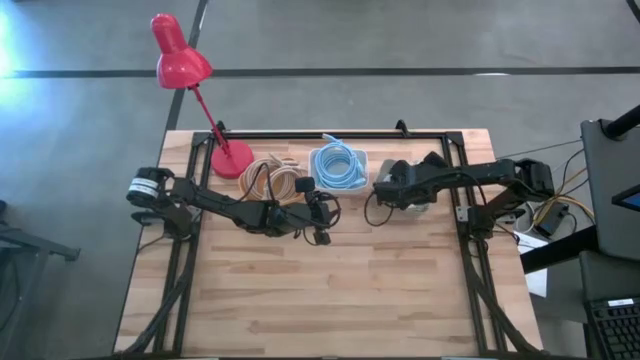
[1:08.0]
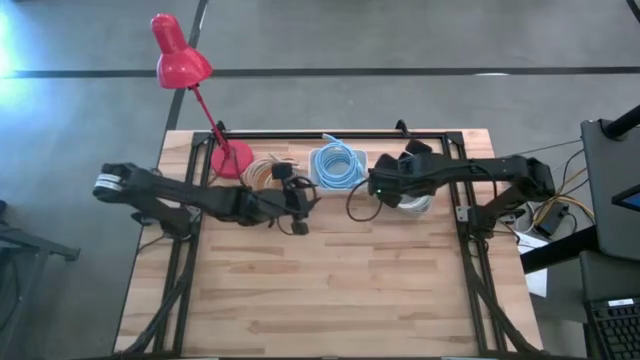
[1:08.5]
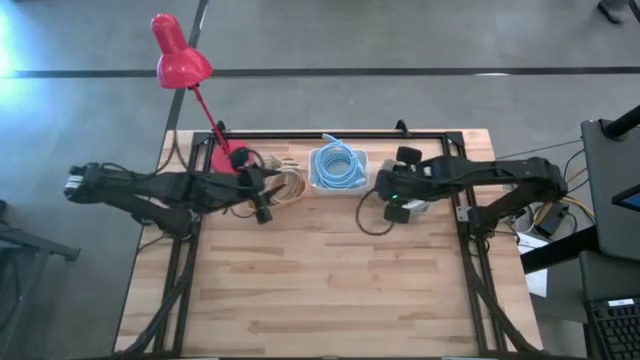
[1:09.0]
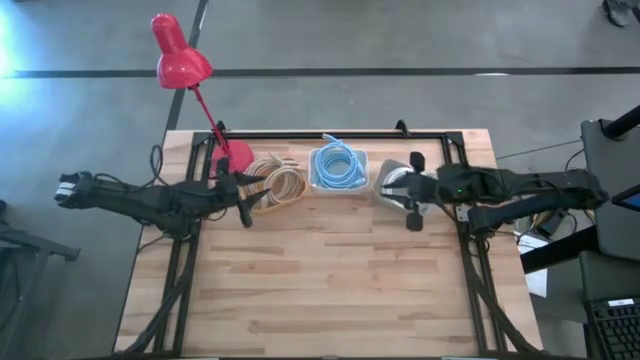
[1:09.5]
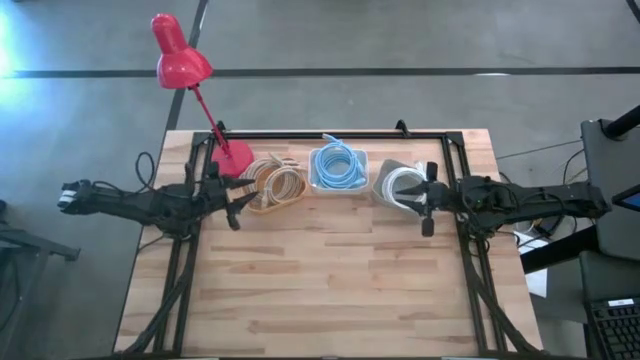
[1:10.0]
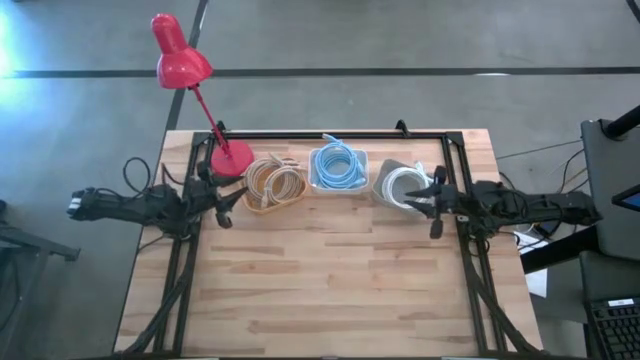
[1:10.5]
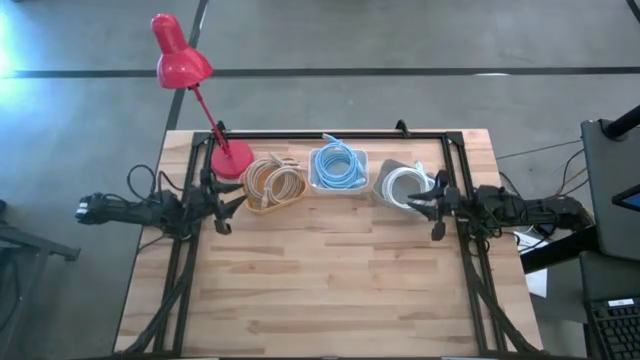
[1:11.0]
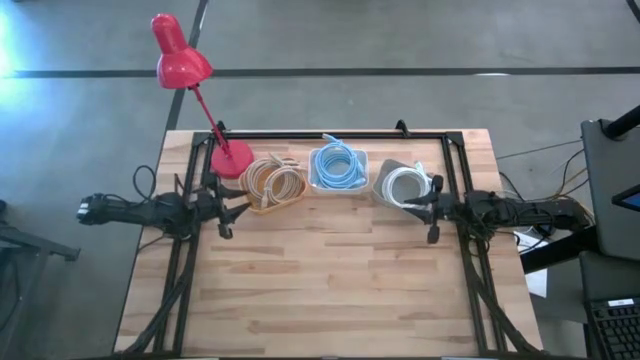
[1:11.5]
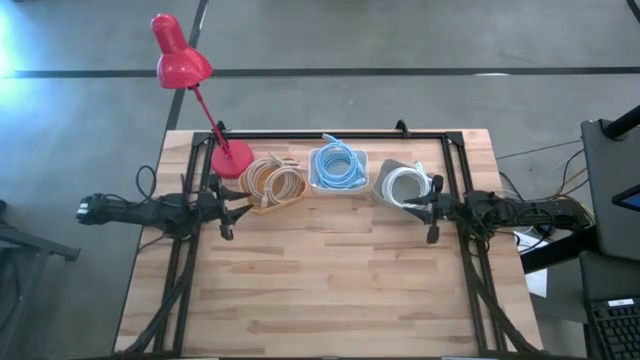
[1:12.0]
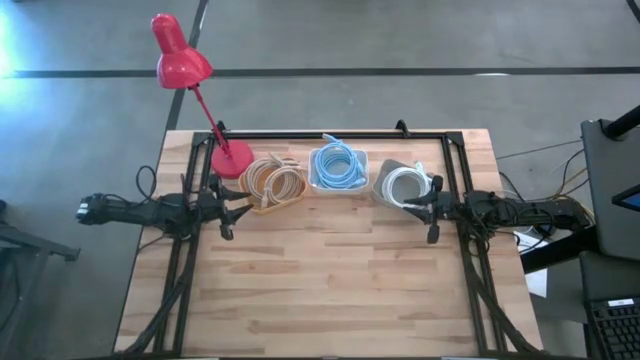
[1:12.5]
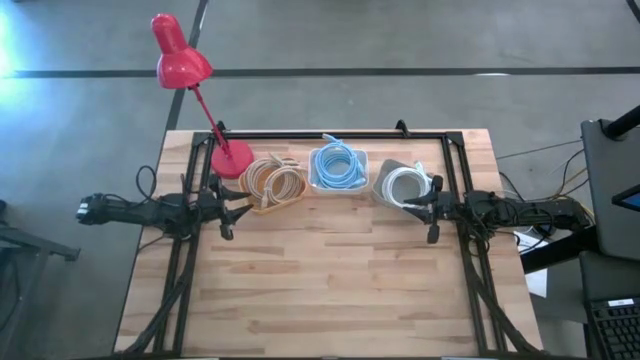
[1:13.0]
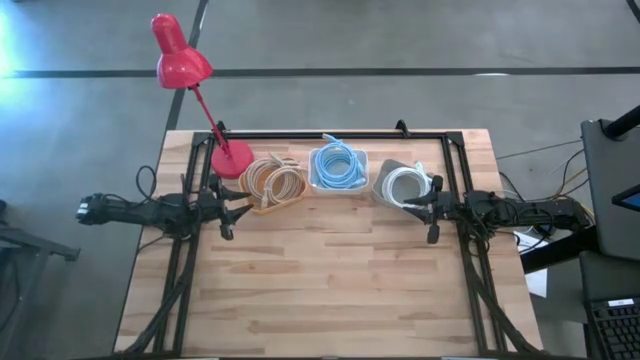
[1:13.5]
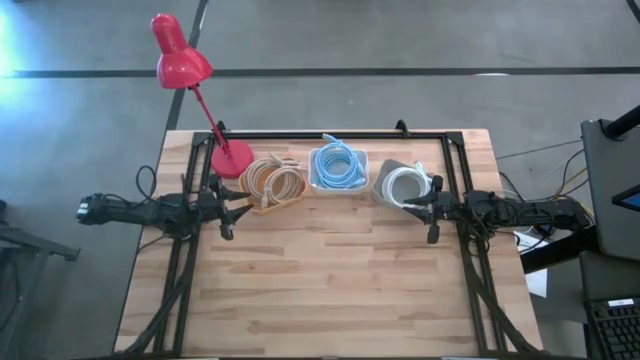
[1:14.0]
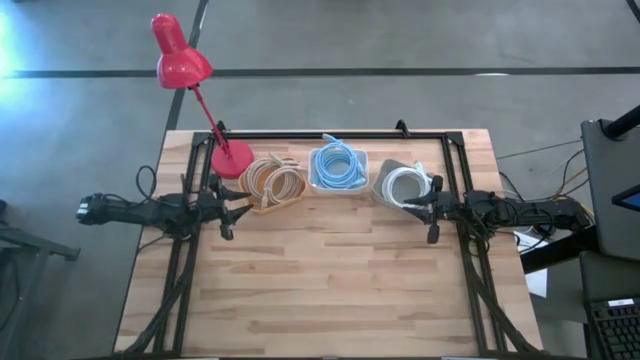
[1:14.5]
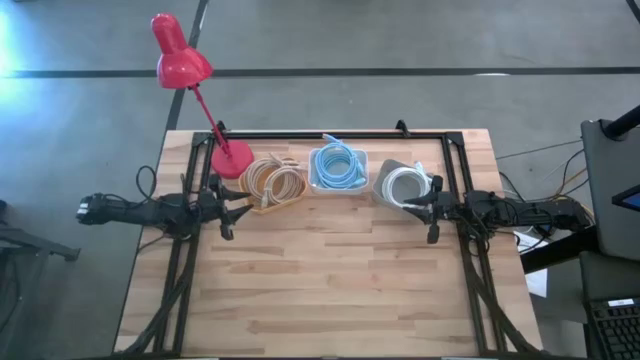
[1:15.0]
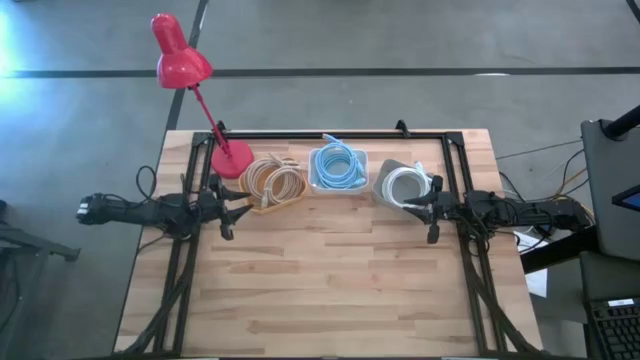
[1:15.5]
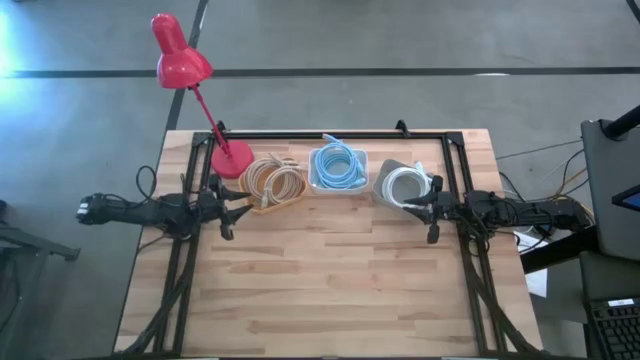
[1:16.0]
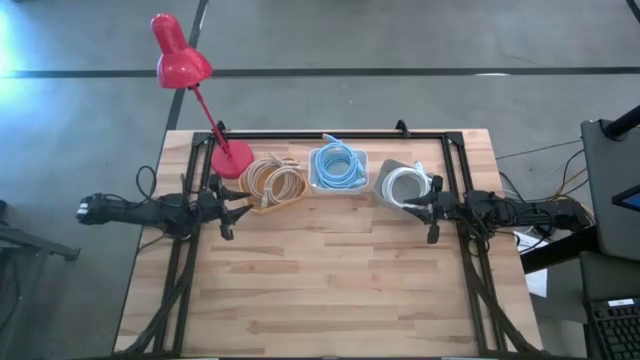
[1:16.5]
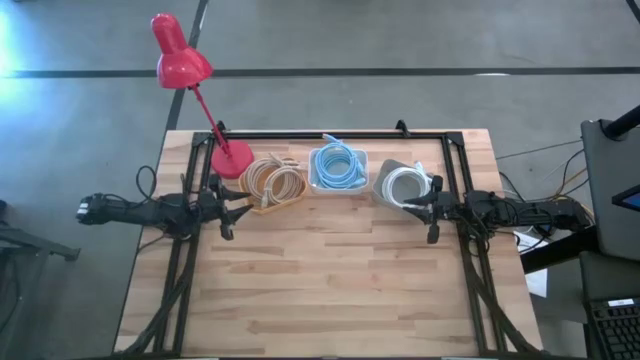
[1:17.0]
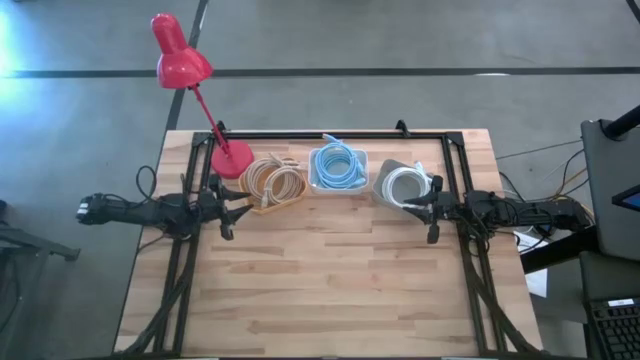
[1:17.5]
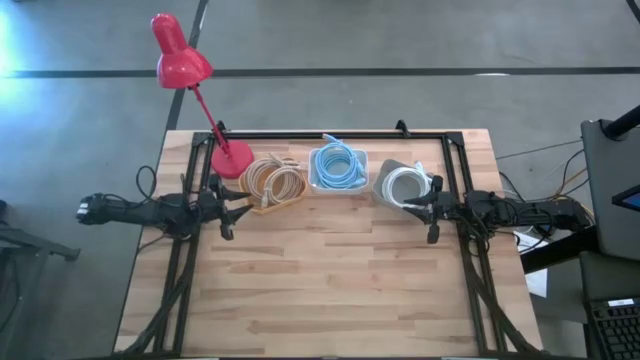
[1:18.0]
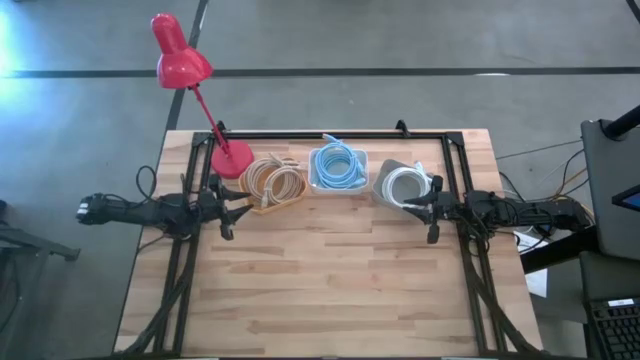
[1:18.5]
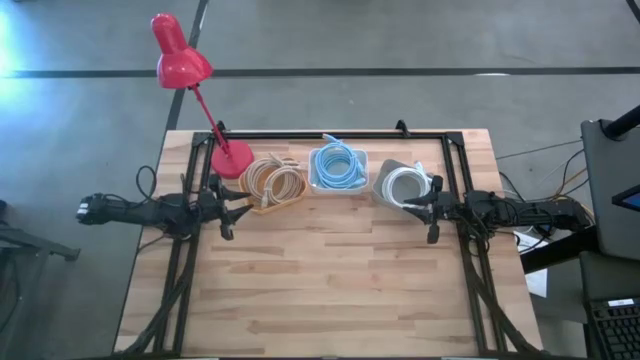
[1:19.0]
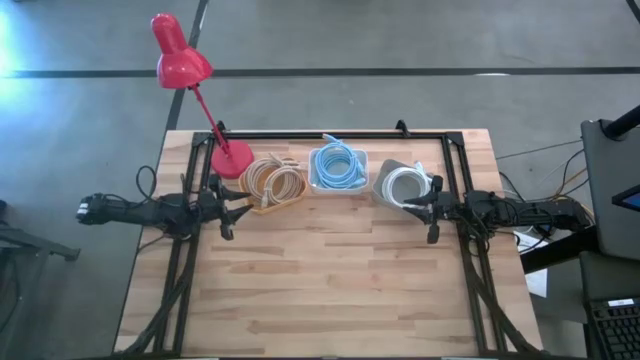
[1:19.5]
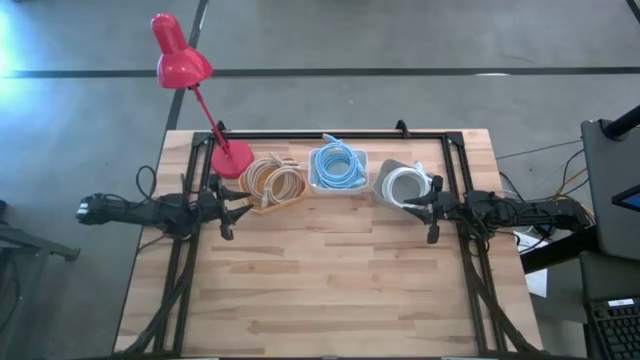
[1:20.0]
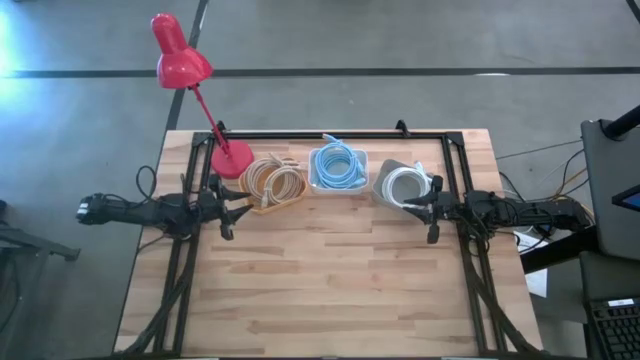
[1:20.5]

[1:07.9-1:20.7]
Task: Pick & Place USB Port
Return to Home Position

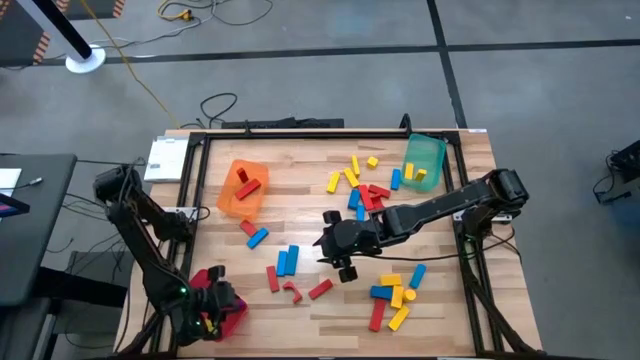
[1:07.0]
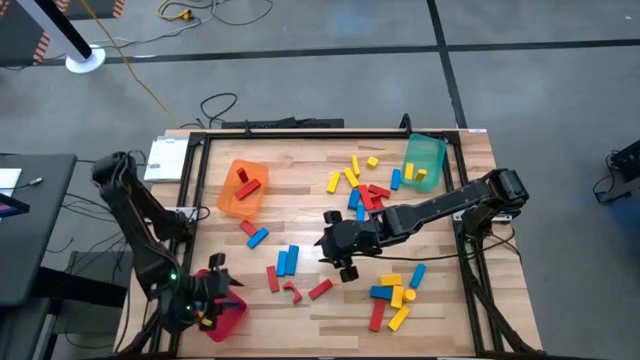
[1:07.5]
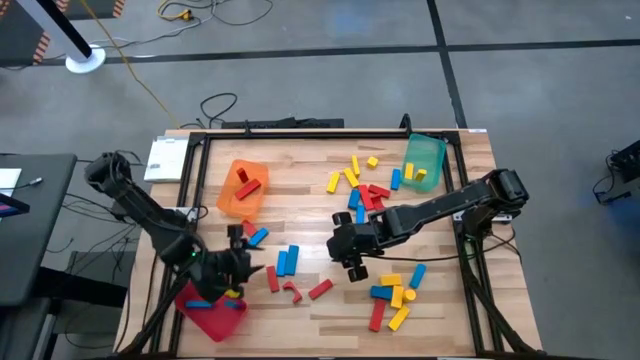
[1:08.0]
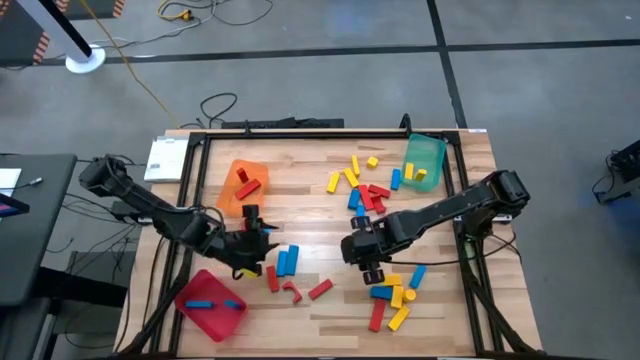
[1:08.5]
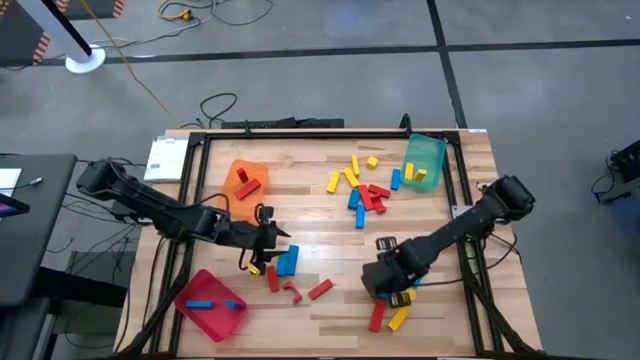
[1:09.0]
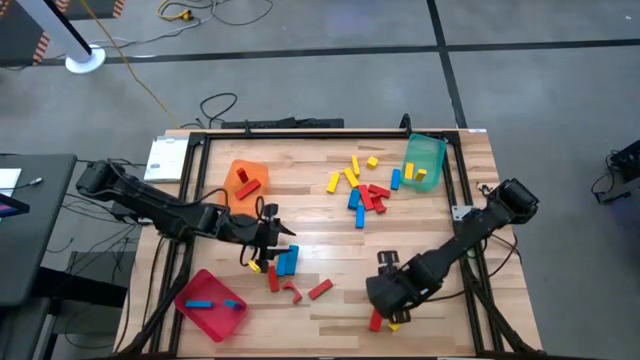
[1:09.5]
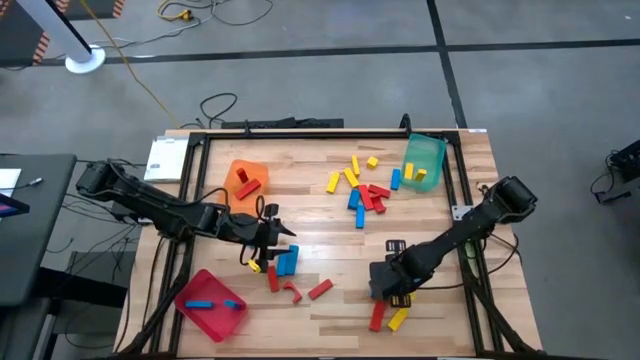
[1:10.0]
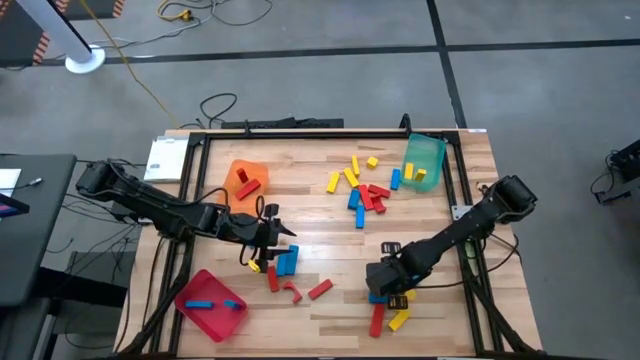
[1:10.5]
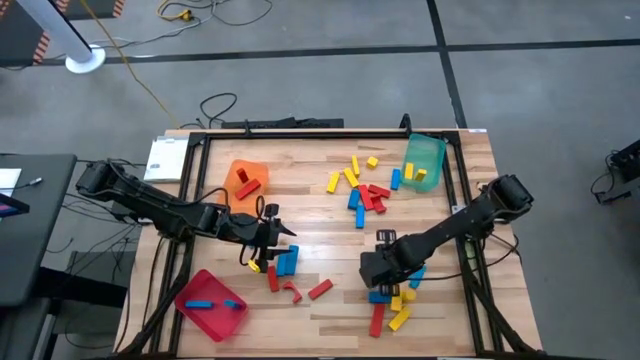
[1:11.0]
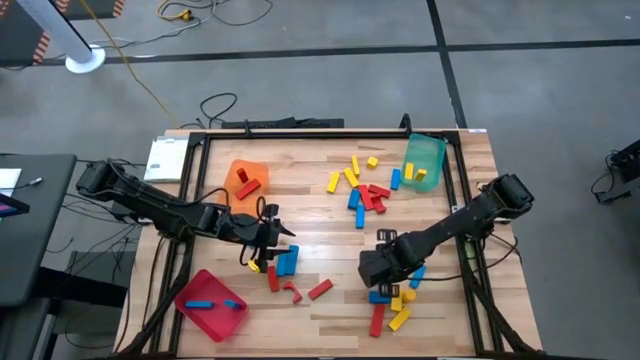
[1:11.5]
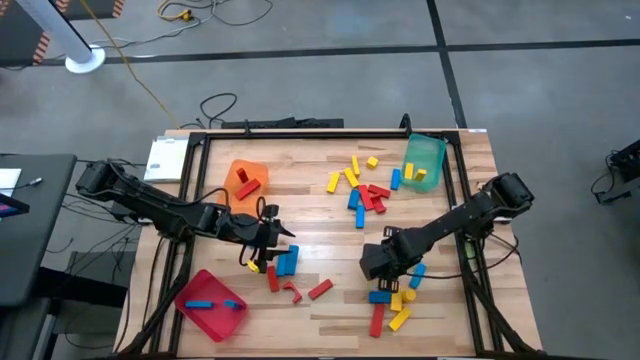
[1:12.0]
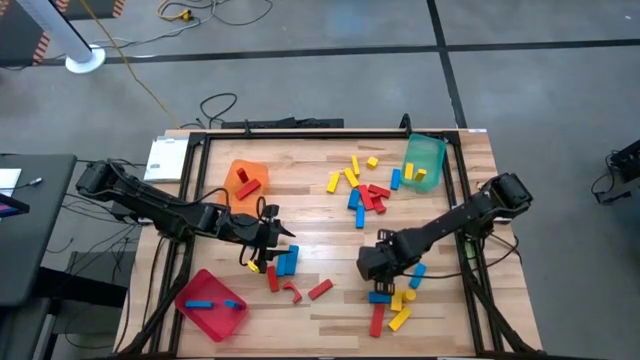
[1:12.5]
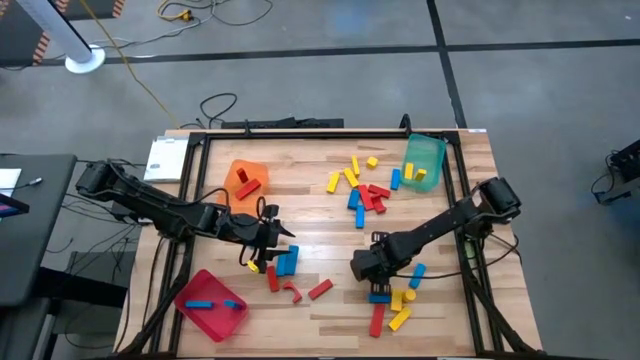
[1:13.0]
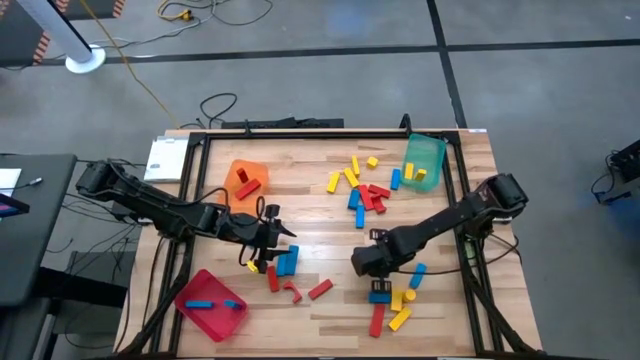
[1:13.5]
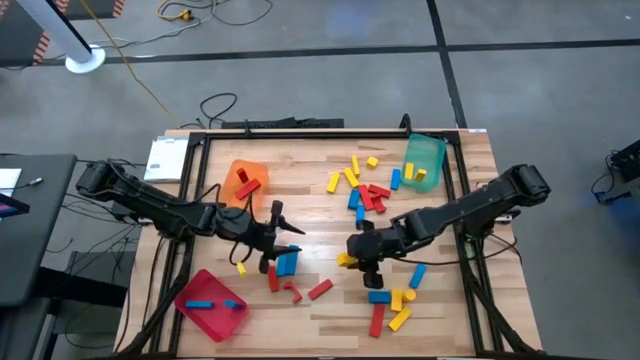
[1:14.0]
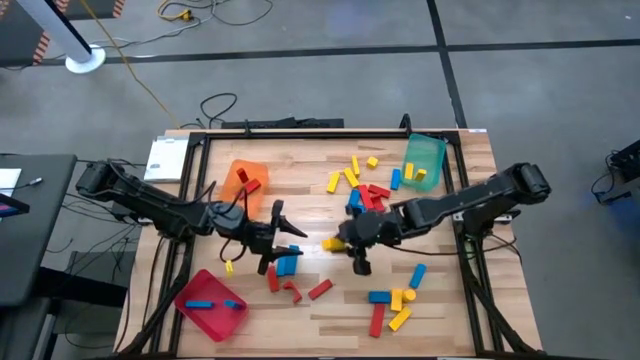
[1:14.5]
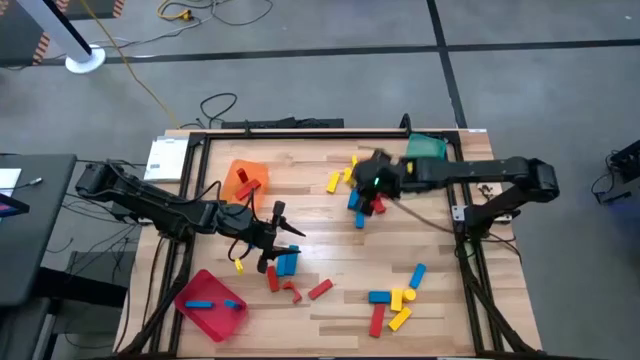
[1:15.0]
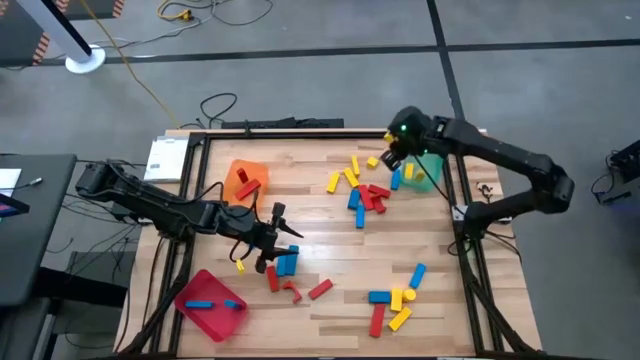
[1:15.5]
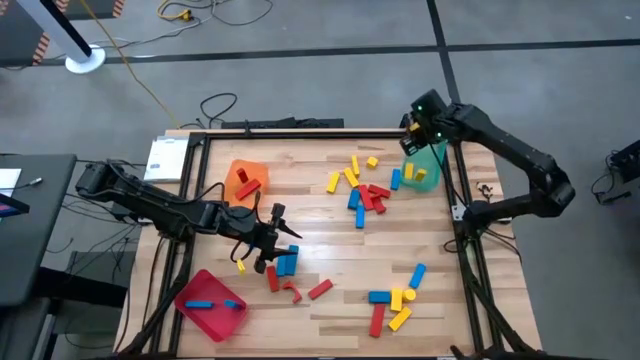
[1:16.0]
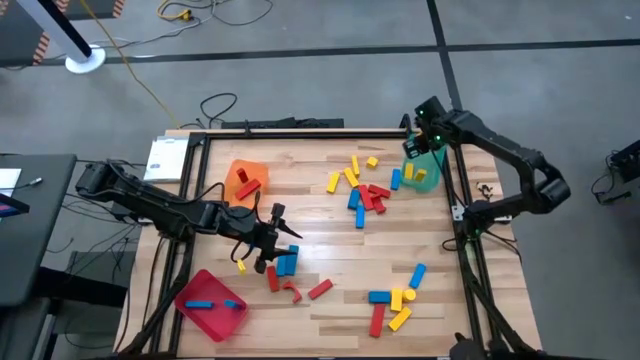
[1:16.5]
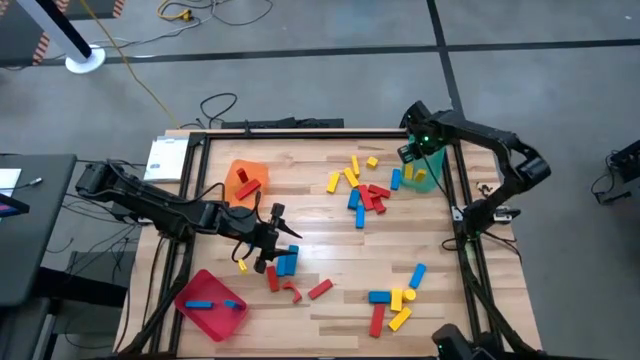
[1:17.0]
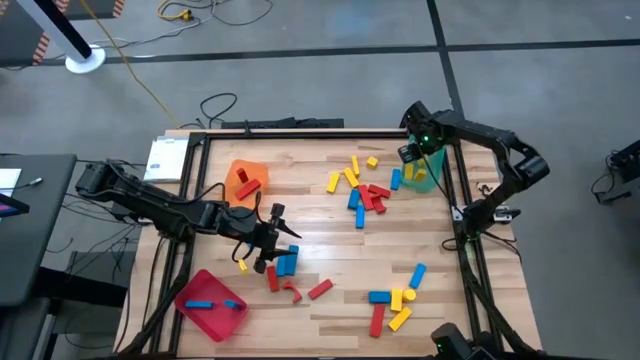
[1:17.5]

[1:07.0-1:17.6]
Task: Sort blocks
Put the yellow wooden block into the green bin
